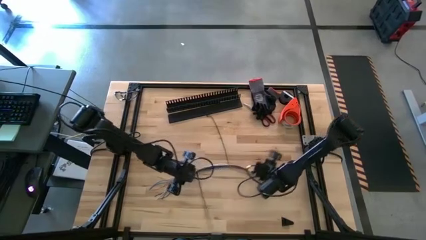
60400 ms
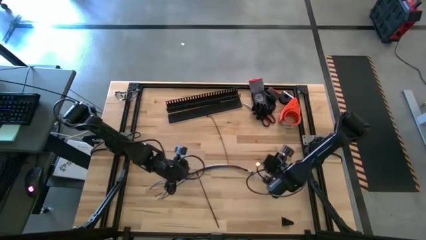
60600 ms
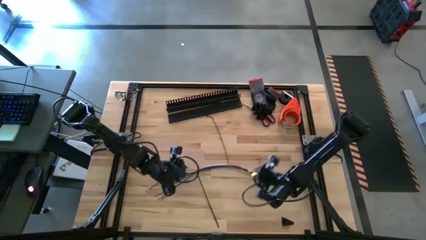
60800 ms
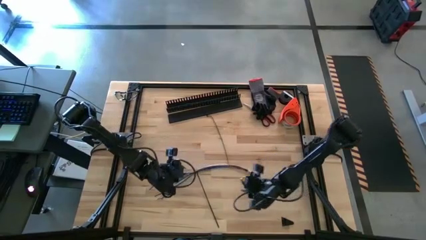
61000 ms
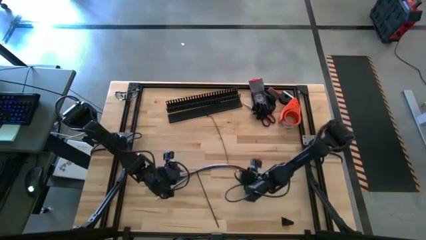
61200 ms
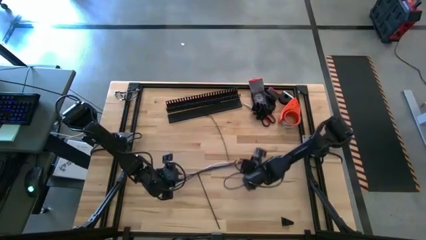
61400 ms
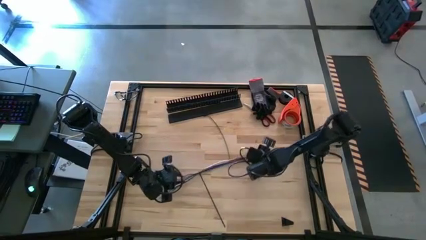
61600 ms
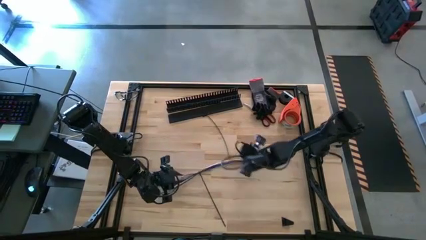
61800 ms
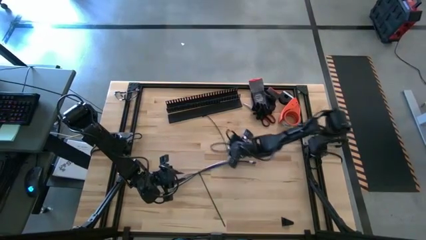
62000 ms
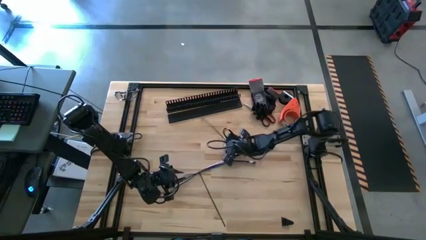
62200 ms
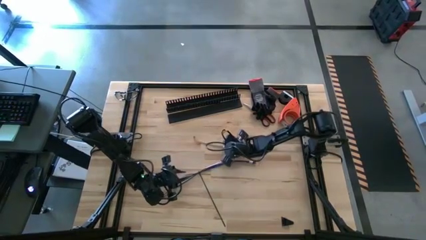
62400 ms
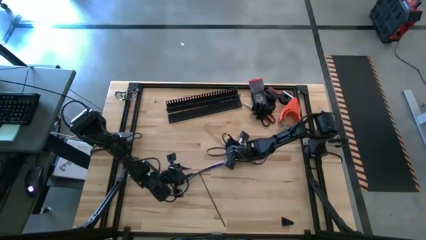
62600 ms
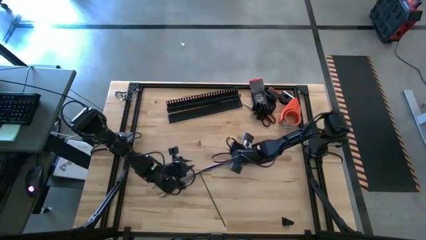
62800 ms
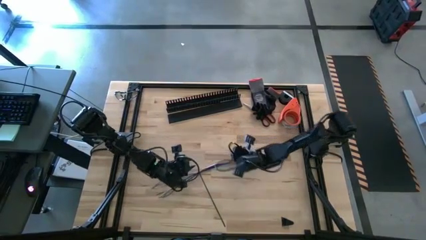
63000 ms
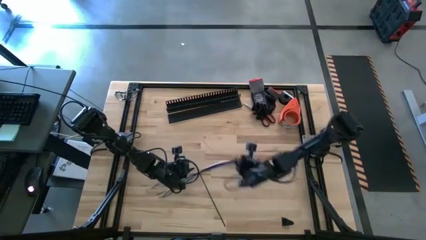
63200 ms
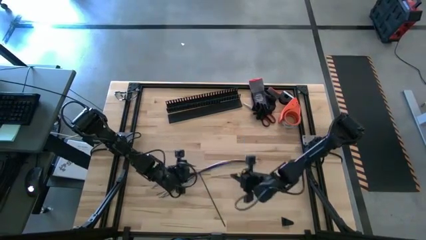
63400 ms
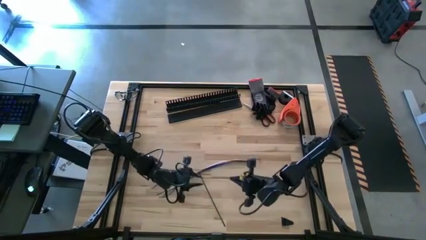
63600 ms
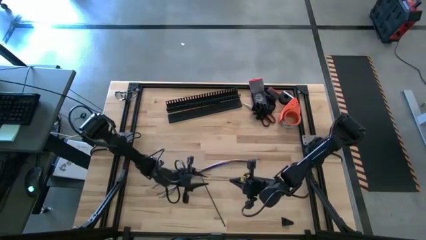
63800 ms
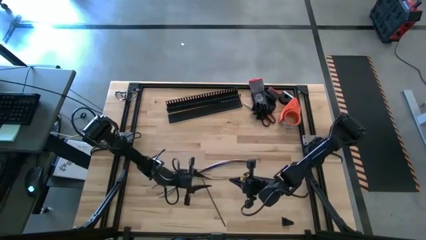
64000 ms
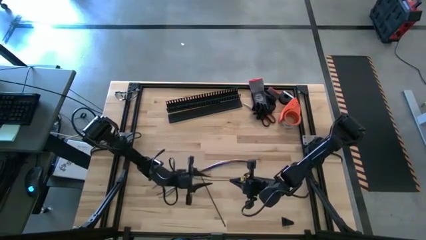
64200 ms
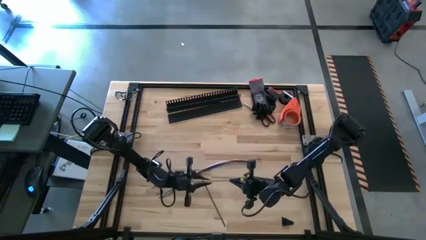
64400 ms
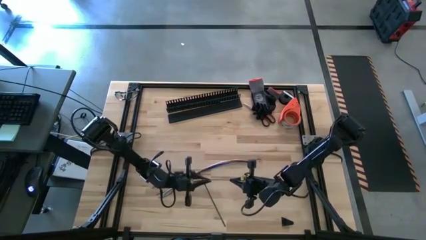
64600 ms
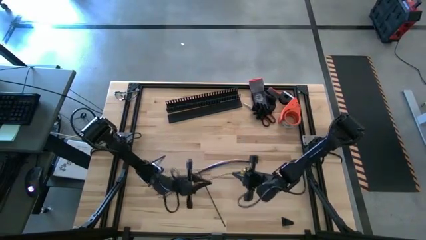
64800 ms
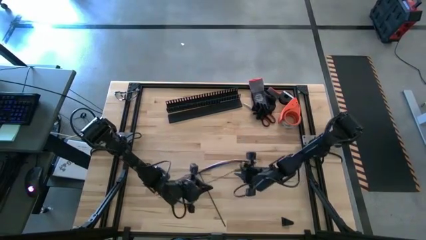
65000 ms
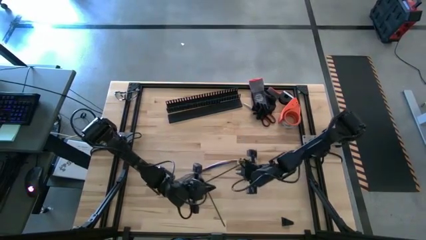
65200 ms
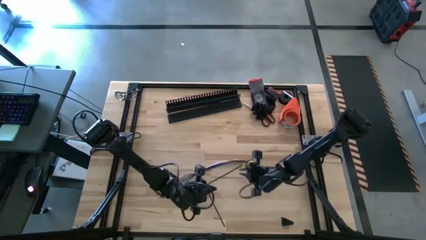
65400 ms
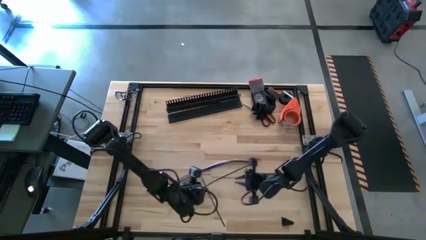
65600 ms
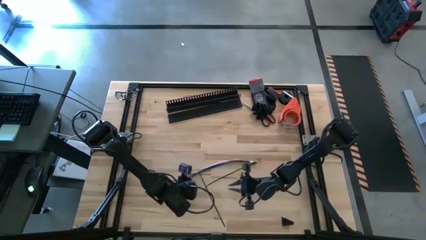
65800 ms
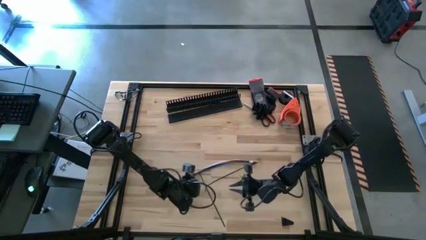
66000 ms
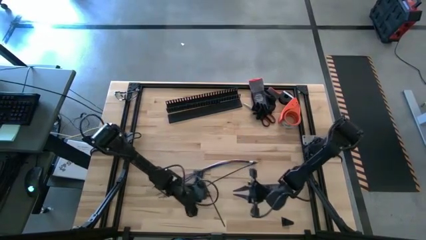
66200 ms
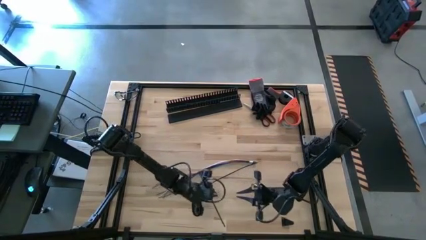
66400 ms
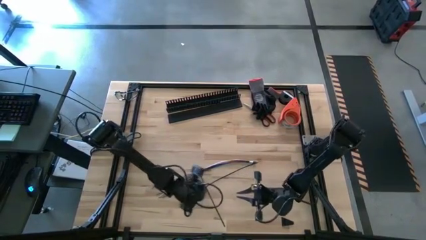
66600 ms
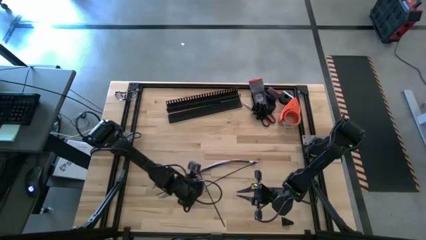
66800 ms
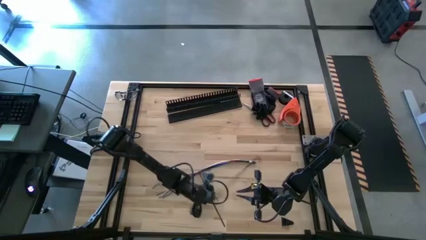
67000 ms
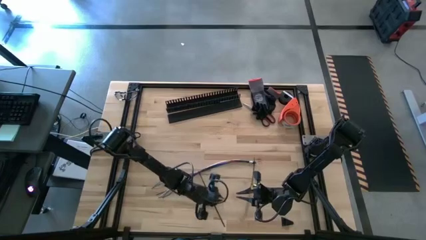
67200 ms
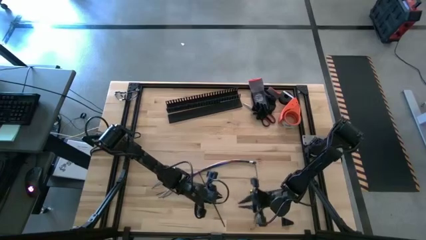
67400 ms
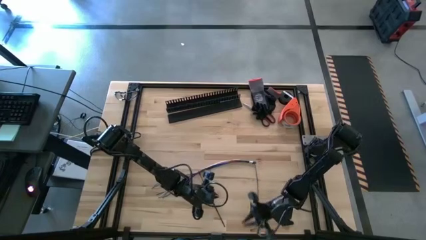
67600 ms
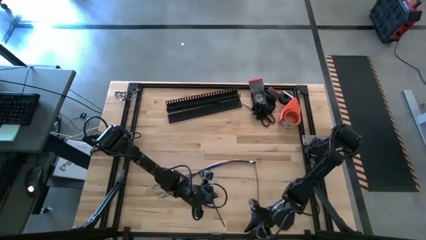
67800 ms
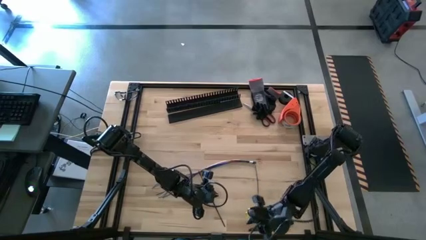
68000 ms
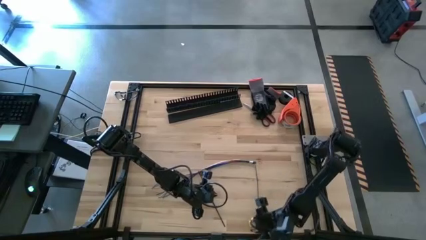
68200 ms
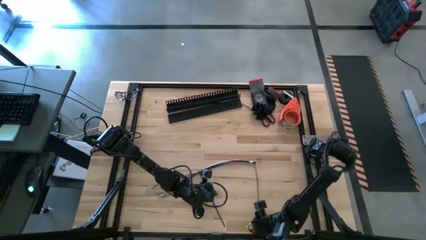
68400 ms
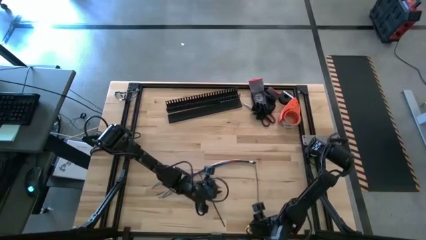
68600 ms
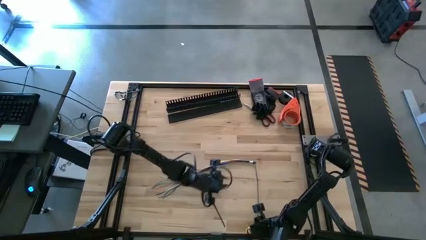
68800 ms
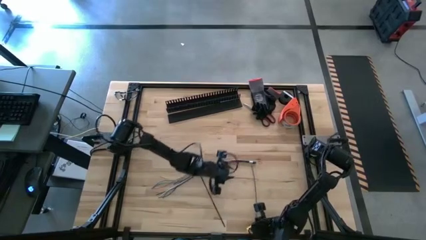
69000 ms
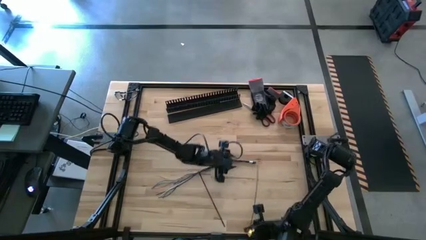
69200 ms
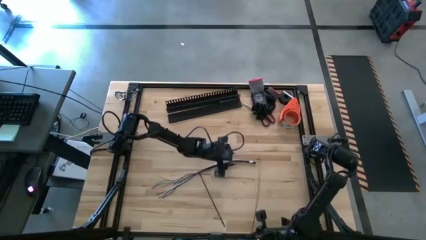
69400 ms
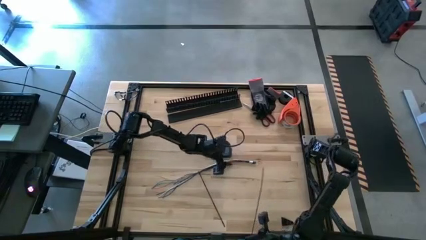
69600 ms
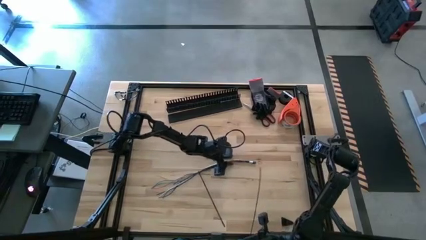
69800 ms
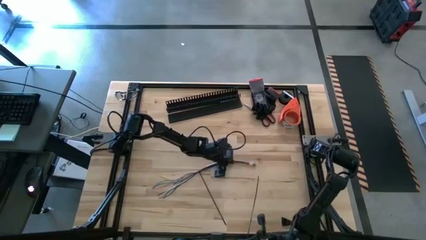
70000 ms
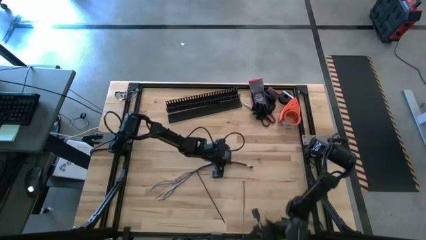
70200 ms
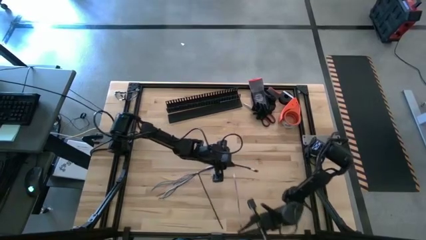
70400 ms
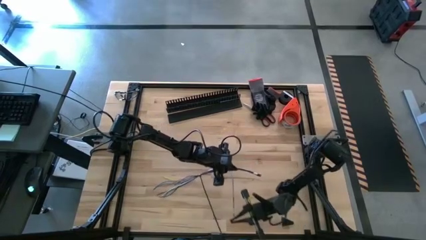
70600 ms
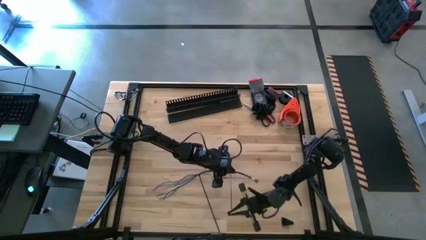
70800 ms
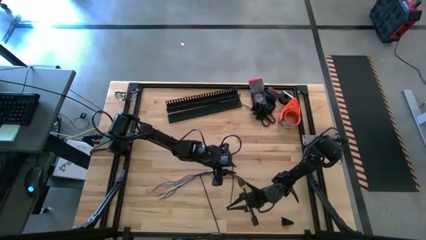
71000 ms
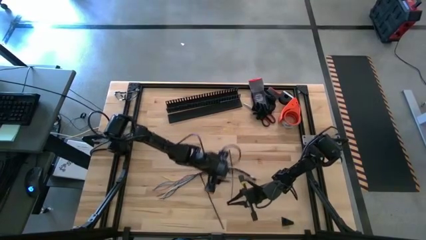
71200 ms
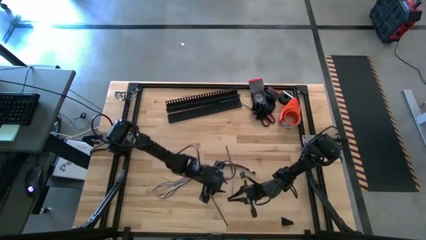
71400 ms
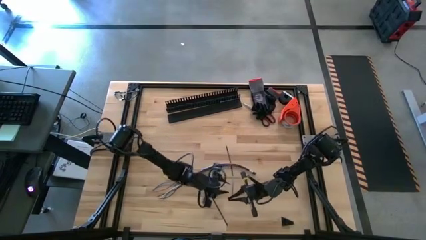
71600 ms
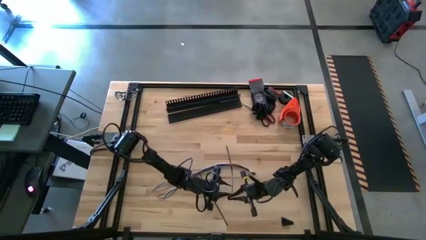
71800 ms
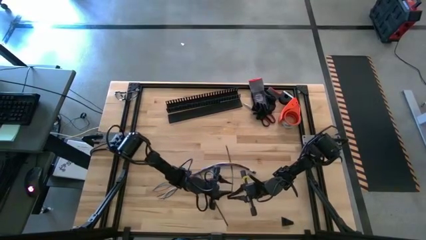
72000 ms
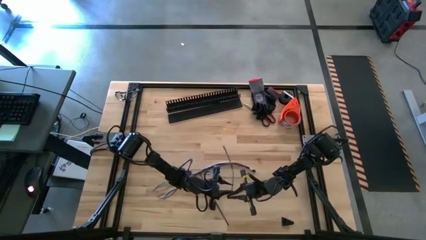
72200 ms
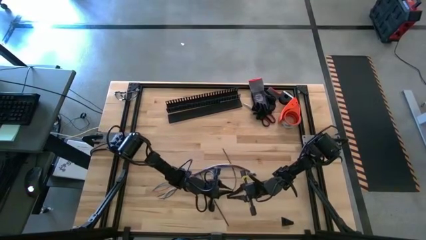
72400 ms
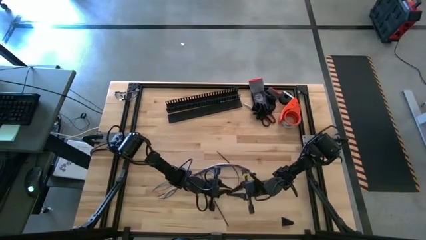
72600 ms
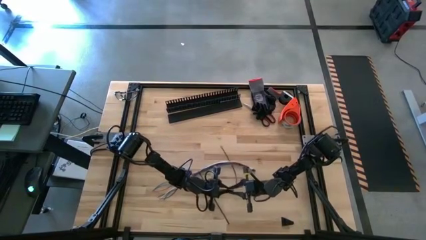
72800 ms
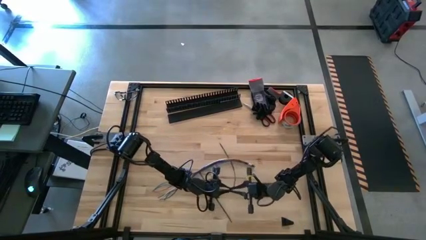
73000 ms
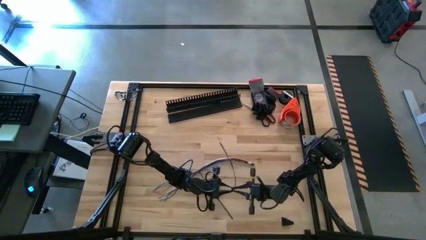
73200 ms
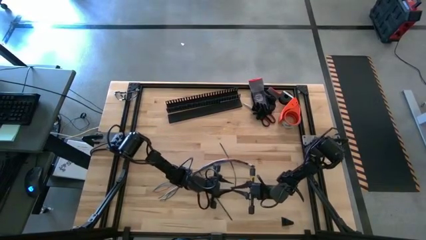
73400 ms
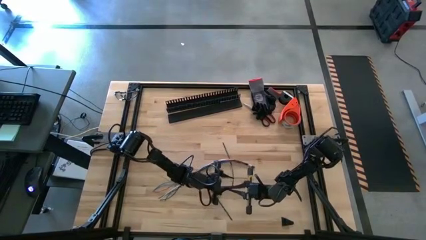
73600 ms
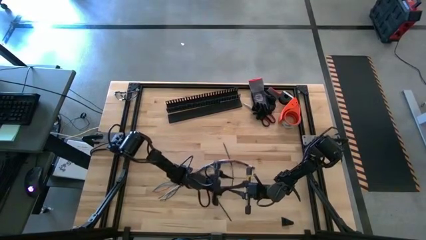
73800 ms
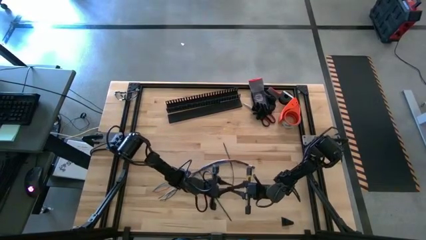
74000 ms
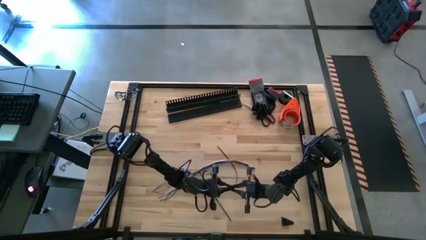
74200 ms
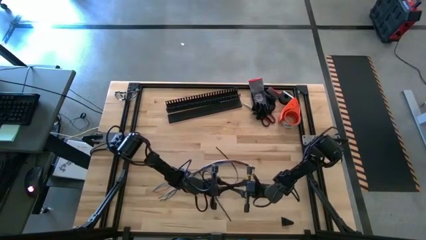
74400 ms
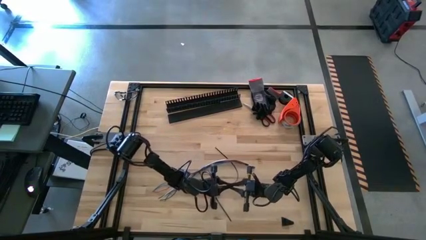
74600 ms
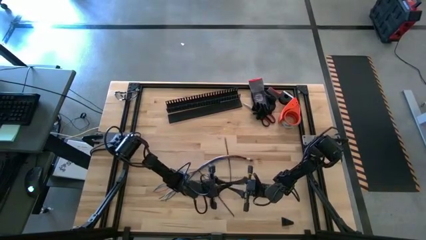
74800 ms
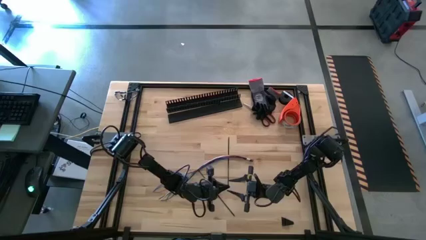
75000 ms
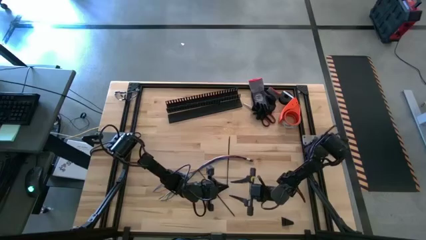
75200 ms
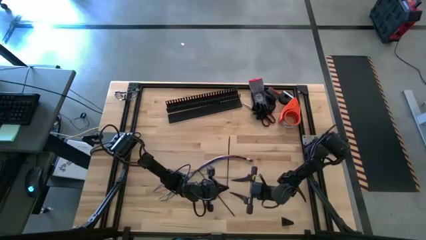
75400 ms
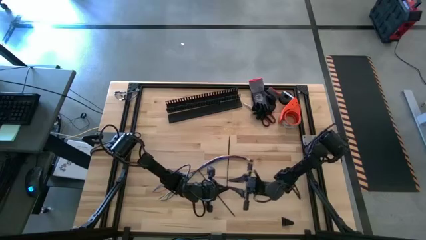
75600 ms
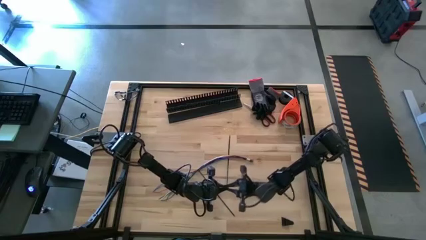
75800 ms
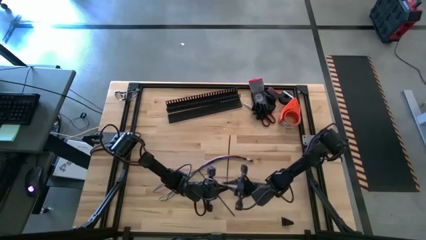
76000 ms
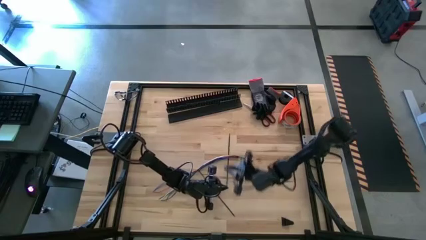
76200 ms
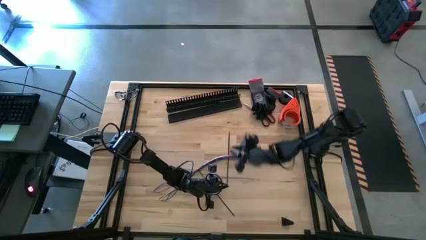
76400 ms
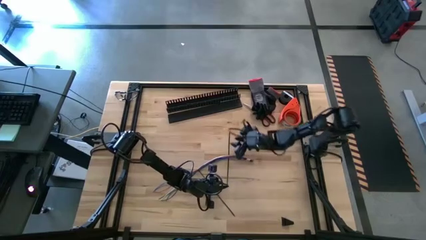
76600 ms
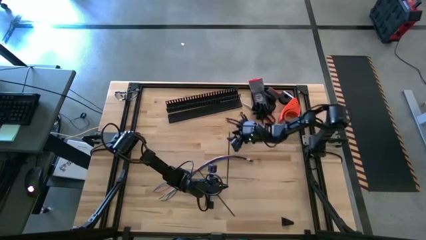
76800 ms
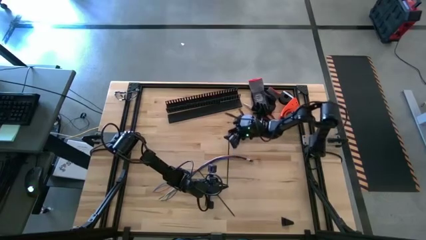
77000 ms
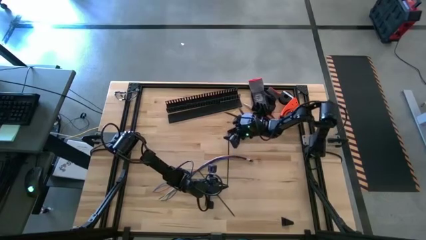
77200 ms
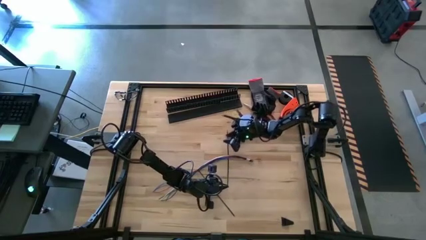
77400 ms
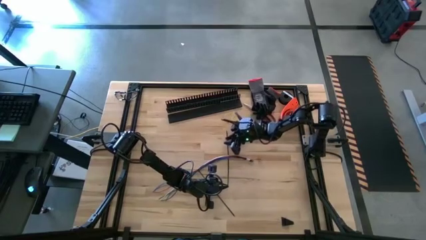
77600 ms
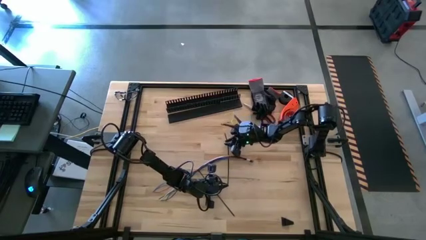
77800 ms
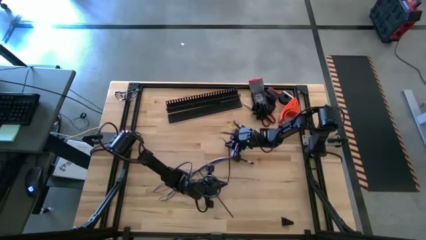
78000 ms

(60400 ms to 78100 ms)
Task: Ziptie cables
Wrap the black zip tie around the colored cable bundle
